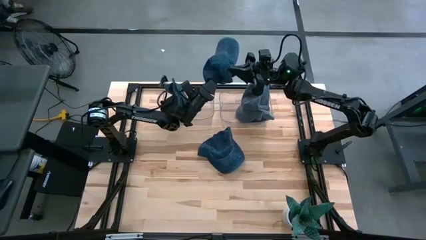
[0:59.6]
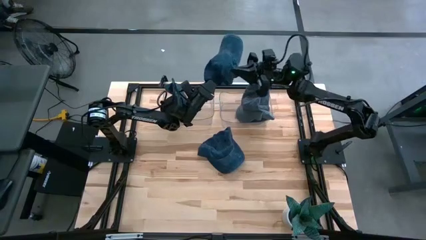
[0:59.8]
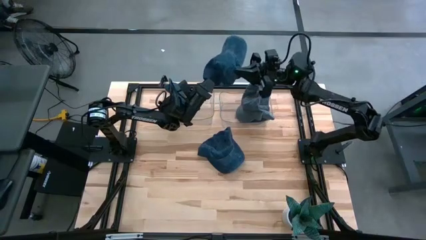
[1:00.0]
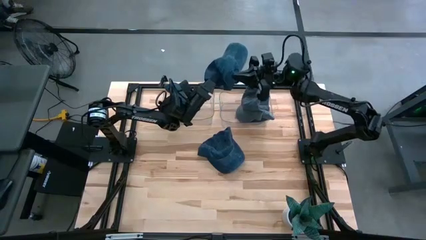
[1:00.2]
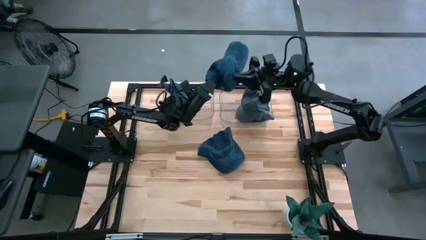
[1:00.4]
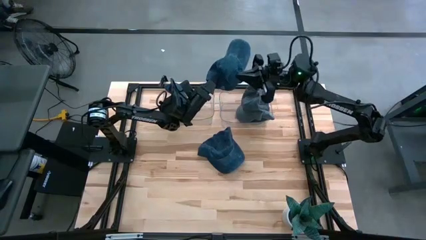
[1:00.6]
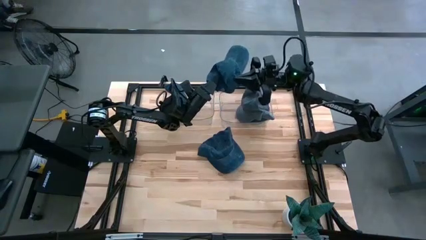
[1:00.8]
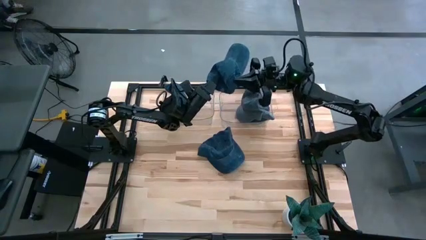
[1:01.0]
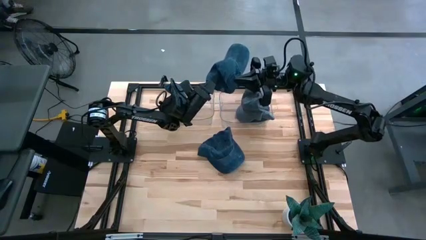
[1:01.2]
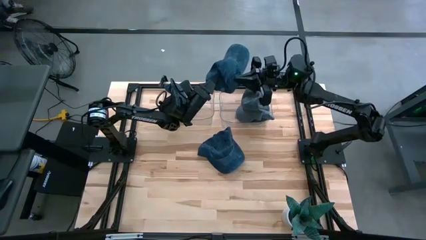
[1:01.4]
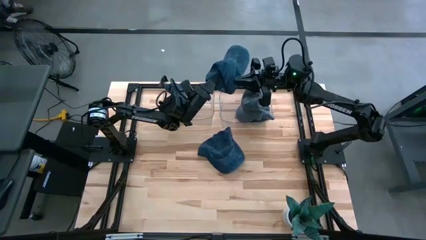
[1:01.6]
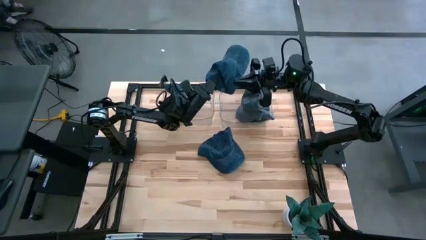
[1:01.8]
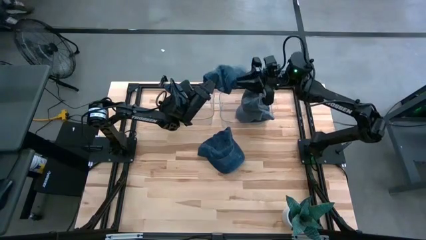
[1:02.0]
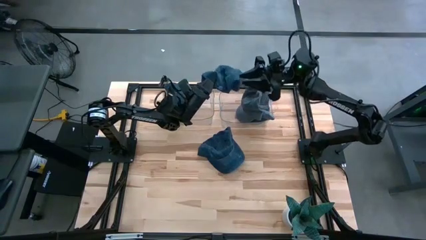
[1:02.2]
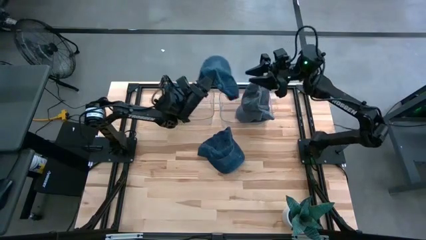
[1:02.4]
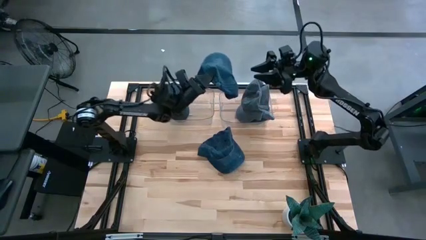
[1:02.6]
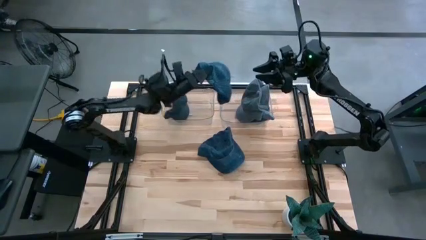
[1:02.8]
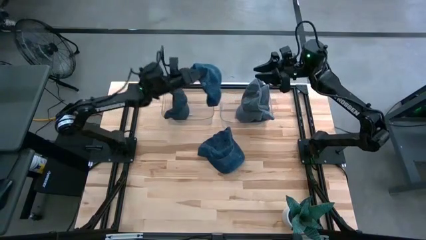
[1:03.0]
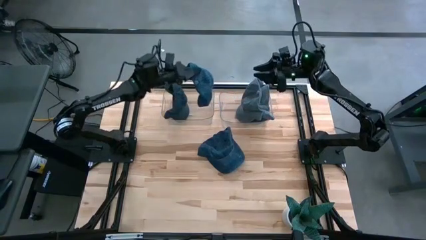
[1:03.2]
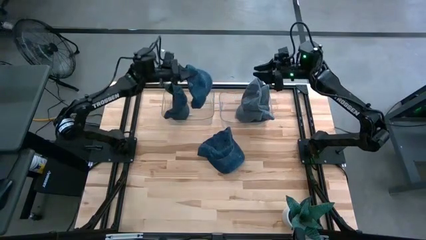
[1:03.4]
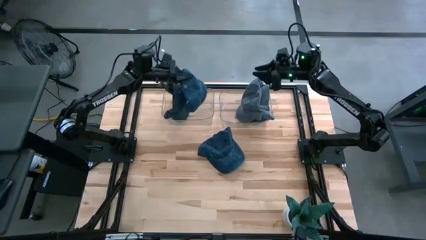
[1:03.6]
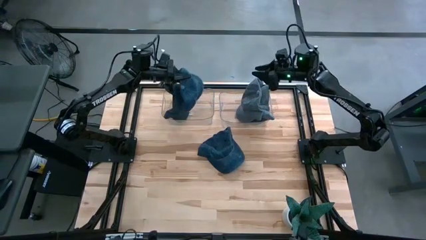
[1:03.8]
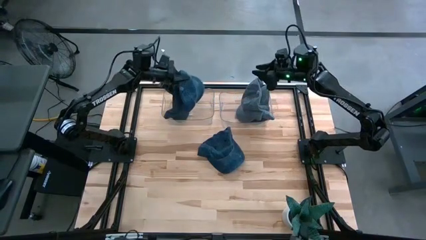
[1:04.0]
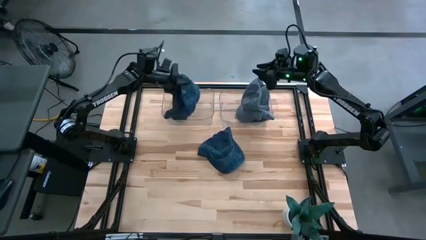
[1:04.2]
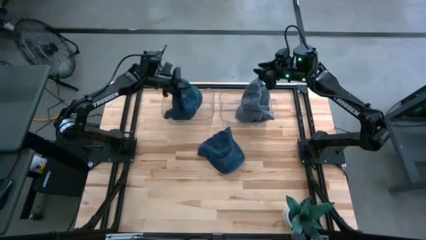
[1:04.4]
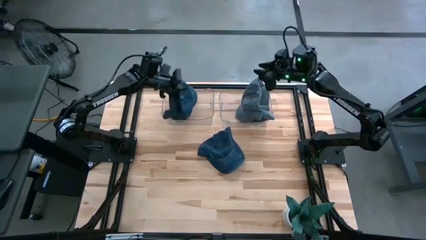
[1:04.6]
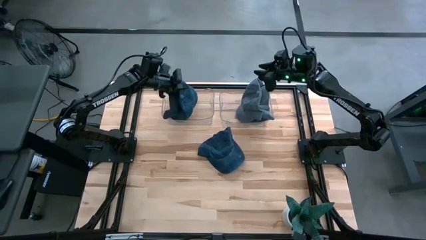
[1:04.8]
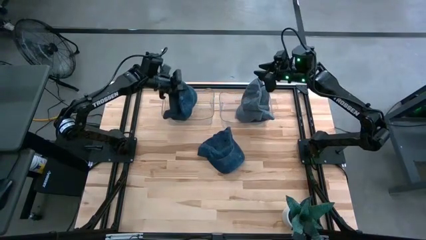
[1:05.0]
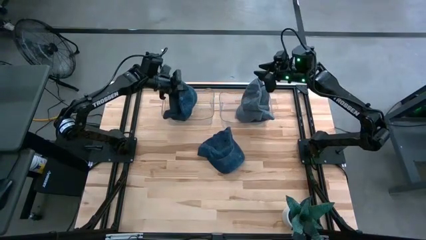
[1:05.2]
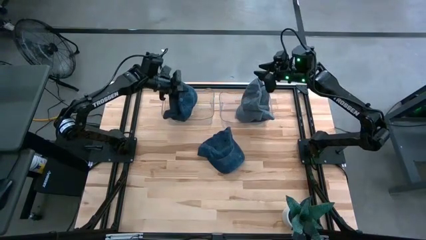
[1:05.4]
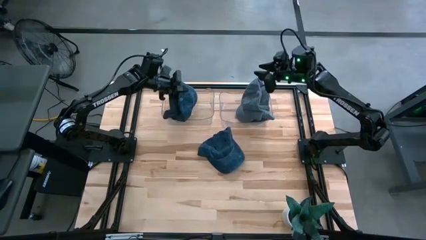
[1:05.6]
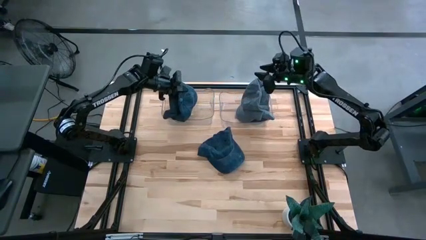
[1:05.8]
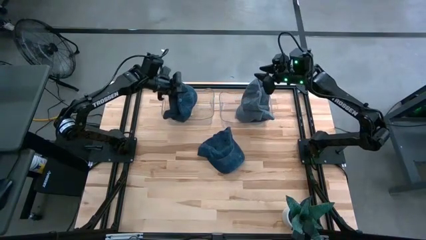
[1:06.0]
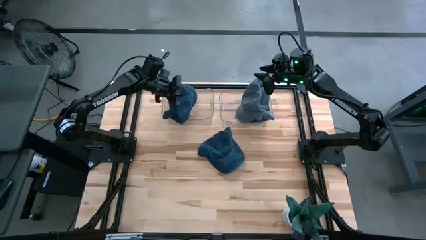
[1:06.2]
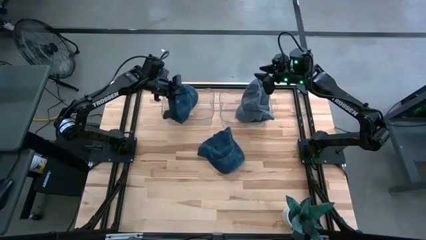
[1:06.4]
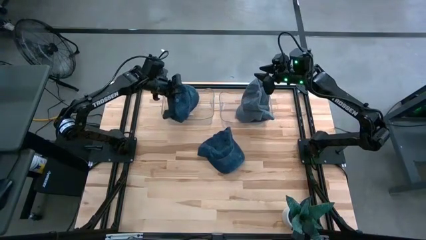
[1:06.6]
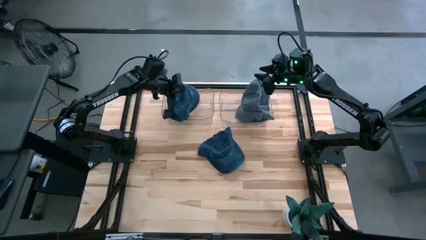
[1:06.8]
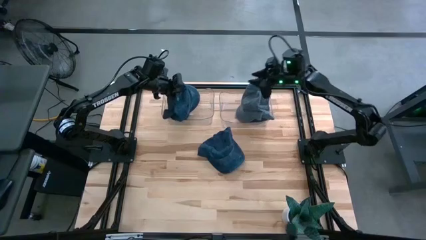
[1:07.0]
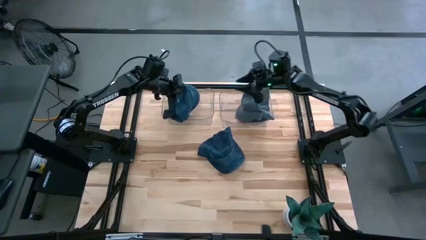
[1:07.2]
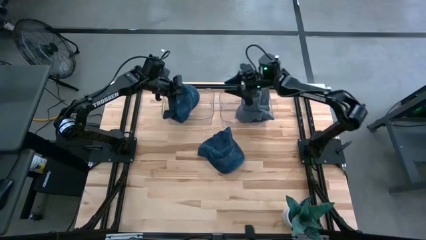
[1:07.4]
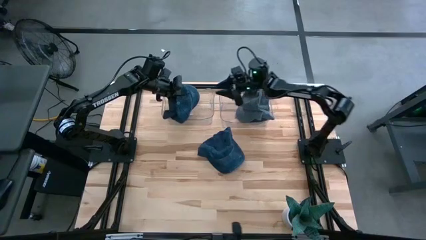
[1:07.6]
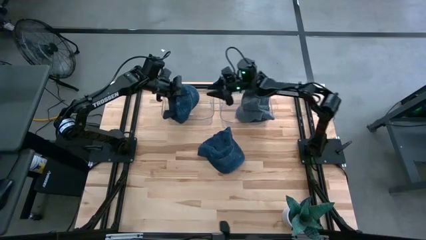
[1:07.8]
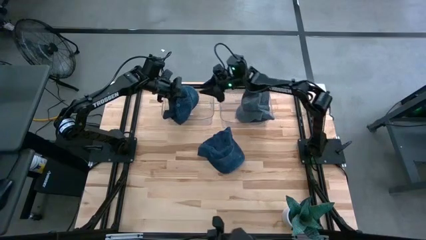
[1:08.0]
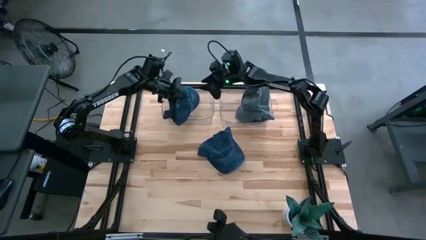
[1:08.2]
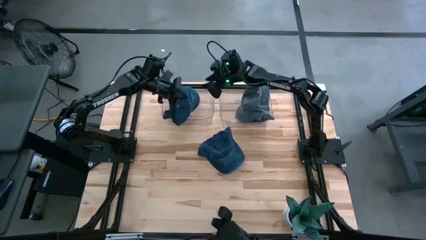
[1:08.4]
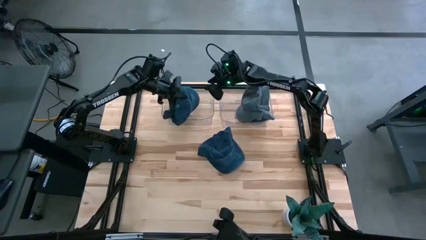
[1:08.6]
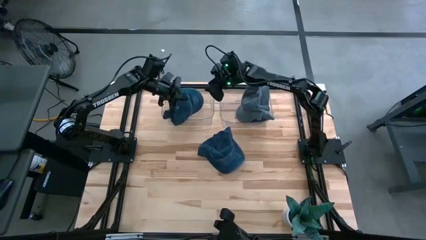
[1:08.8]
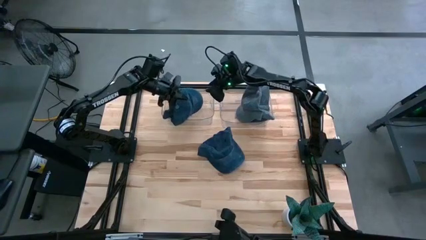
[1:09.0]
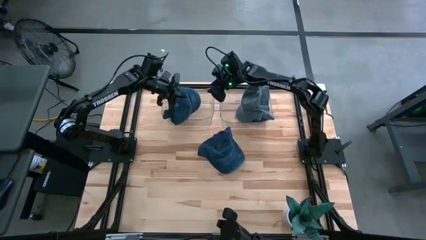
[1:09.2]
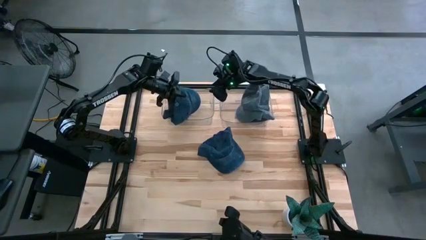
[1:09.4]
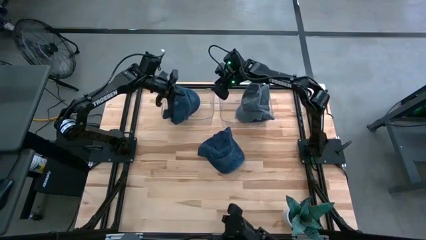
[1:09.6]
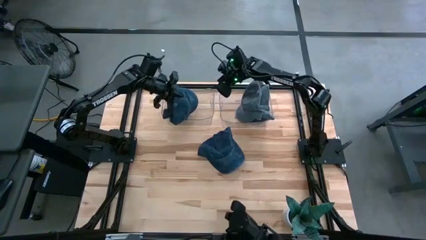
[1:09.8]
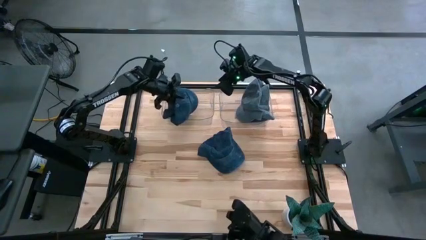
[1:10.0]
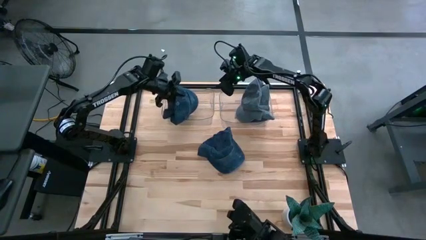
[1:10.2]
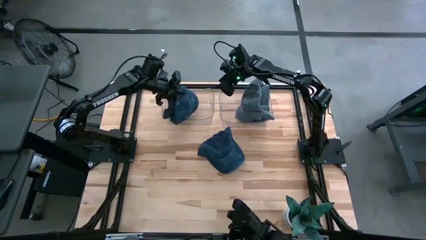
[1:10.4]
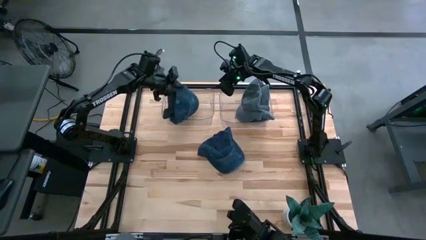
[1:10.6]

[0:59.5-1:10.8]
Task: Pick & Place hat
Put the left blue cap into the left transparent bin

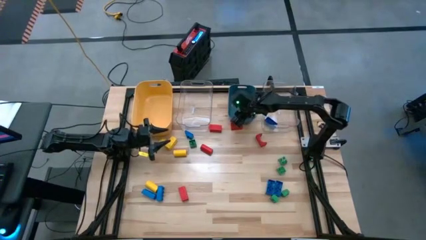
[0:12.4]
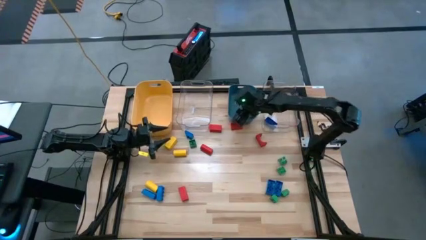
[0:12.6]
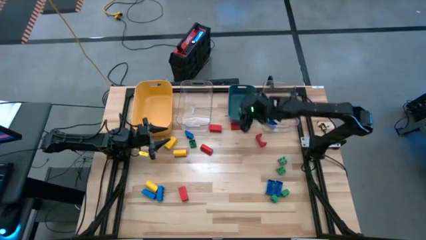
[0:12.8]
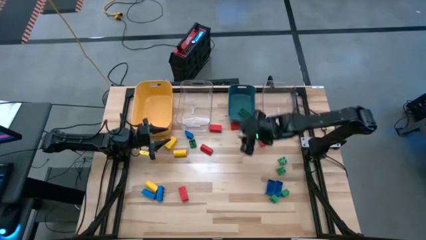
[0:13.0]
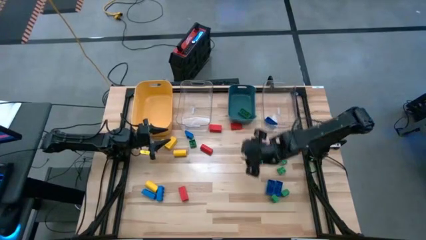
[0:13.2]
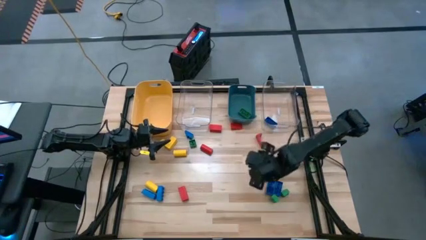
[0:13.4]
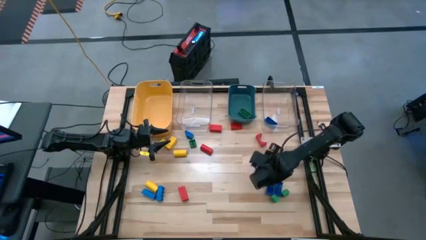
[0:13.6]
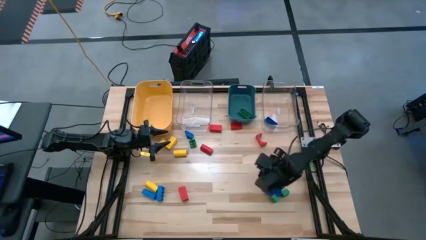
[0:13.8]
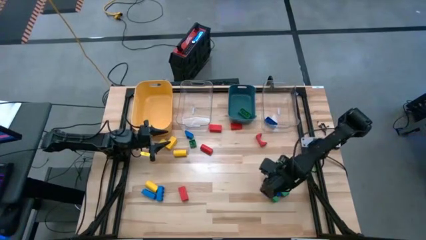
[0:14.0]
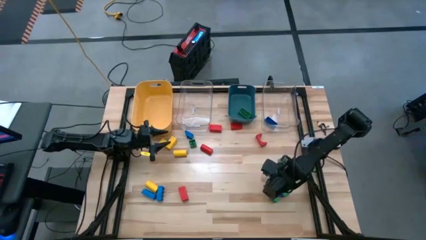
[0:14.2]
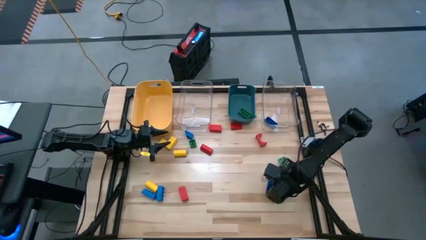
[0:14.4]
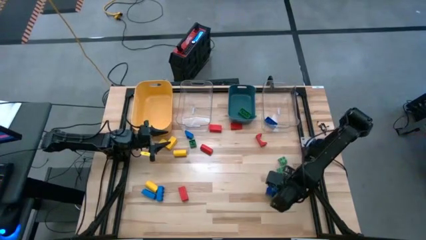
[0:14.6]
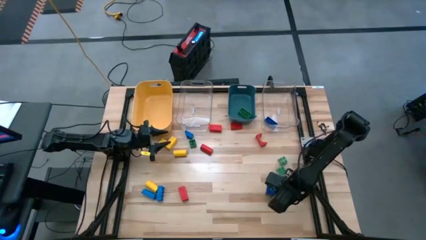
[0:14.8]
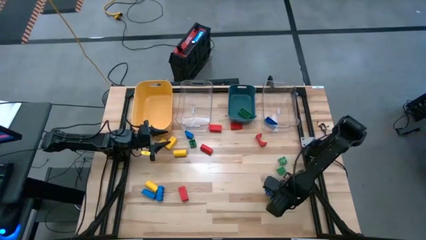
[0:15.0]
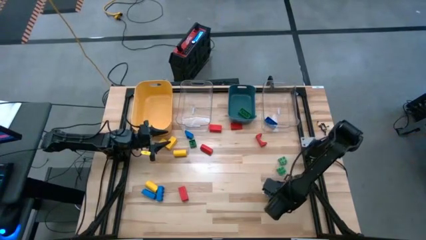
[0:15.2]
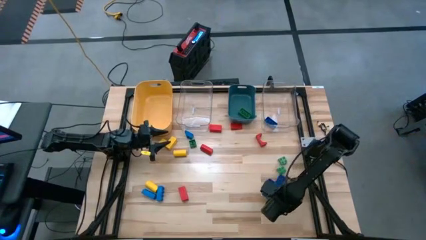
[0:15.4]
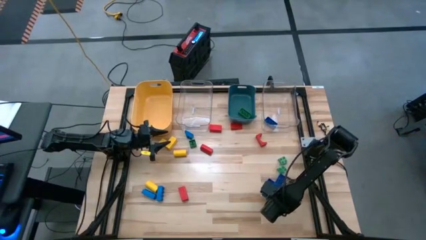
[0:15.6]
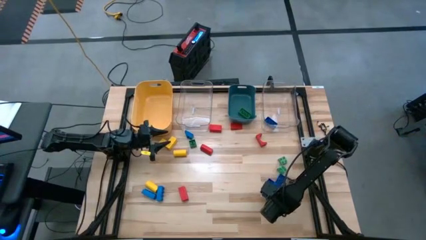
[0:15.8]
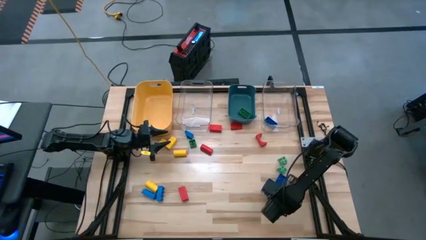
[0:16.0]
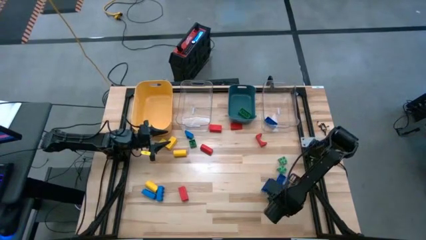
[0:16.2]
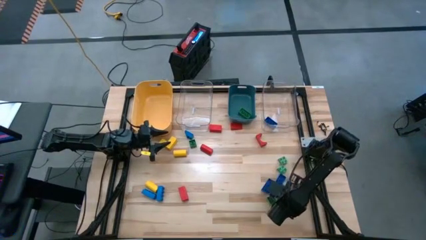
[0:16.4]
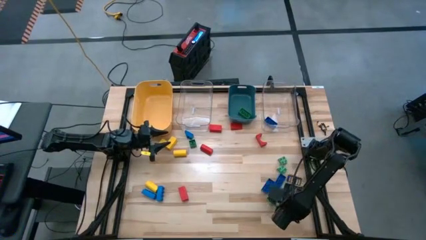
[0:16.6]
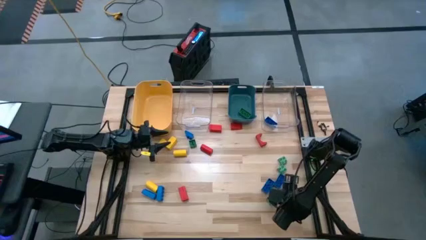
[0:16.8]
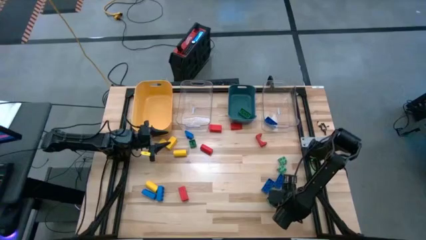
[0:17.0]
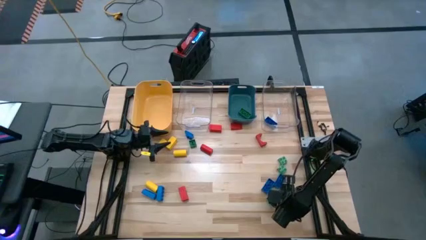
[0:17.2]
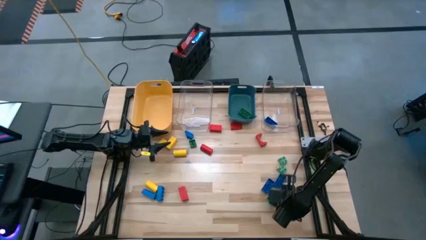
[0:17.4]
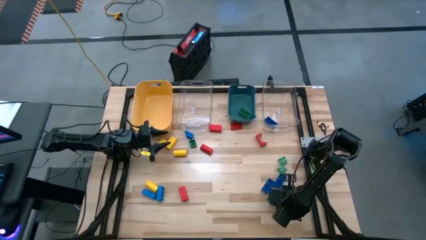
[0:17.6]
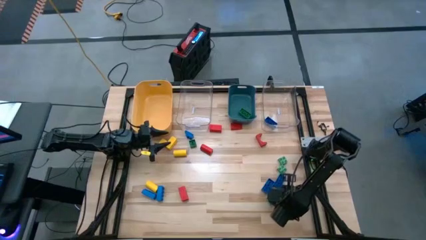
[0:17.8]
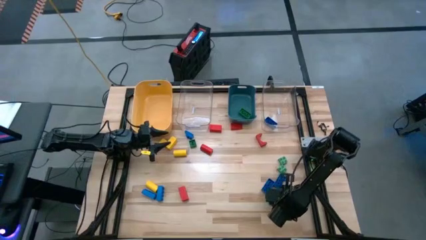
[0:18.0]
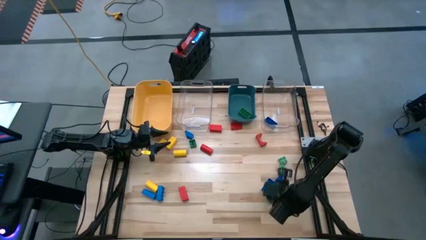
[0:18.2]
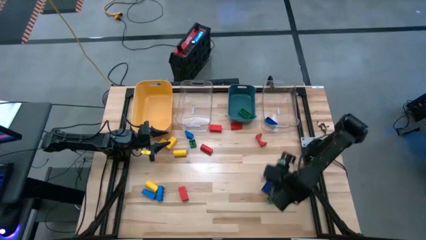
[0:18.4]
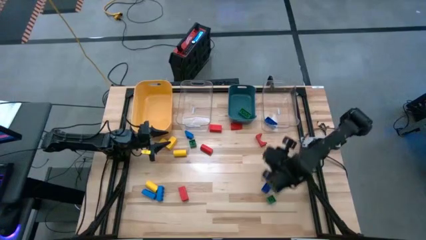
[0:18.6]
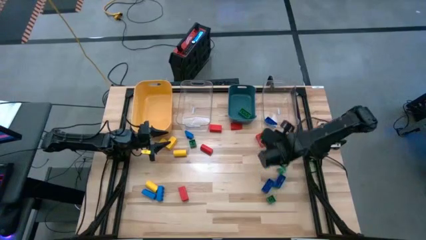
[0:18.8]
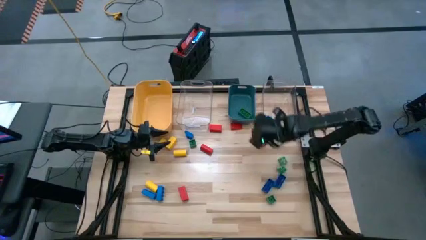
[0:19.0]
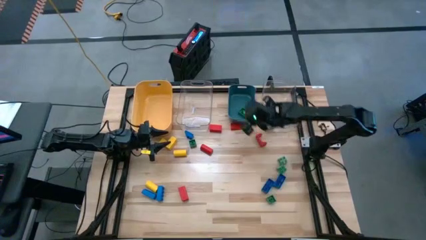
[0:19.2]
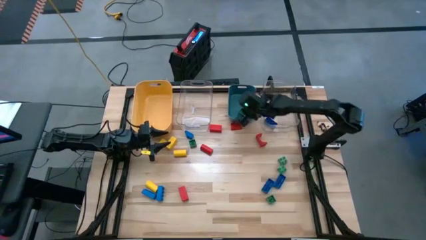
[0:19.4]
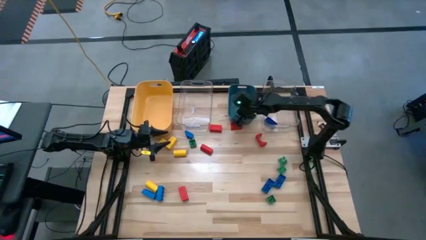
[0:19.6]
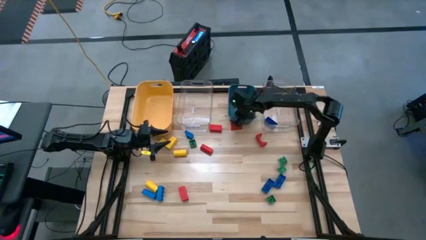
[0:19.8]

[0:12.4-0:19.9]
Task: Sort blocks
Put the green game piece into the blue bin
